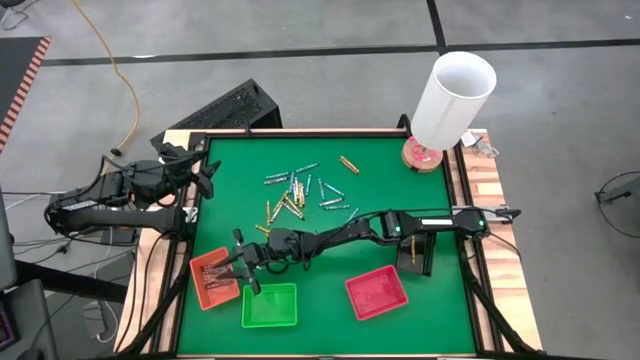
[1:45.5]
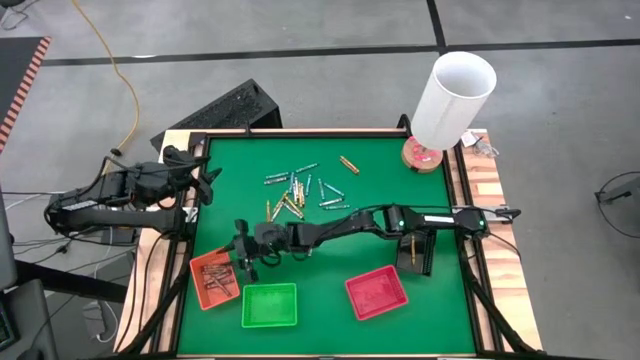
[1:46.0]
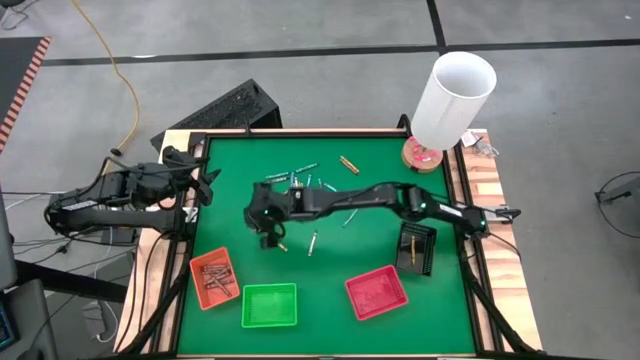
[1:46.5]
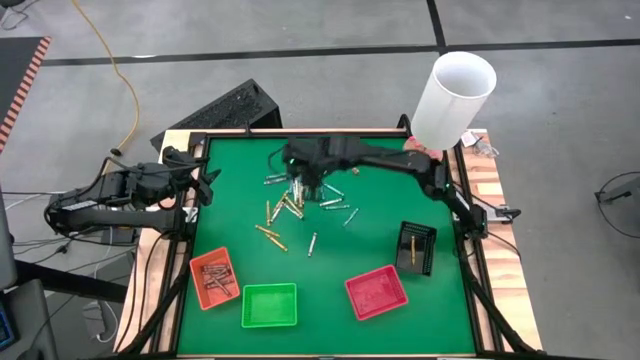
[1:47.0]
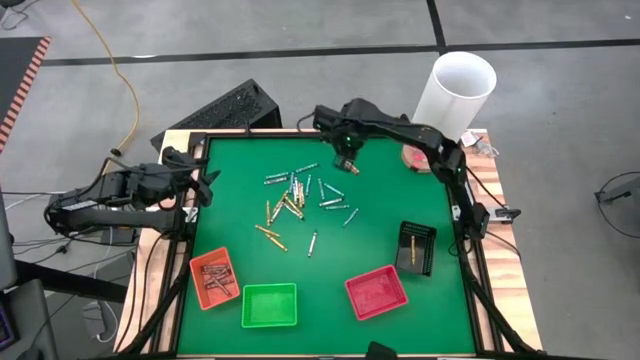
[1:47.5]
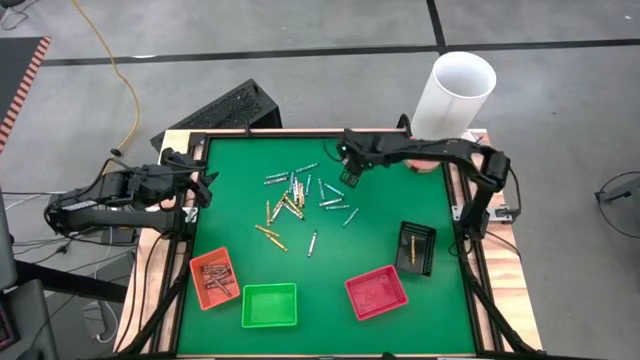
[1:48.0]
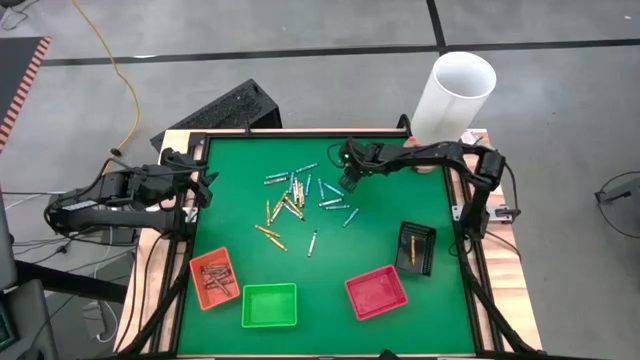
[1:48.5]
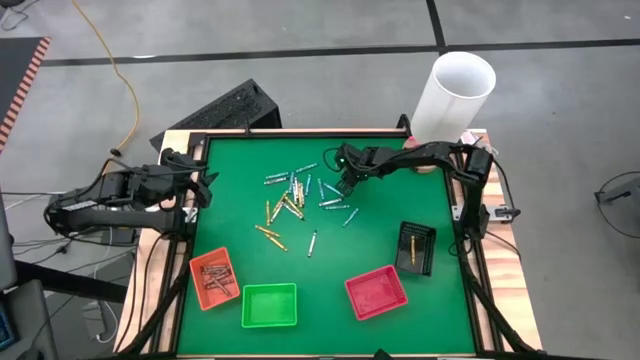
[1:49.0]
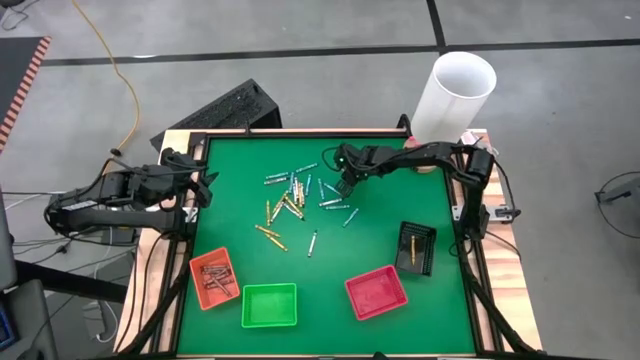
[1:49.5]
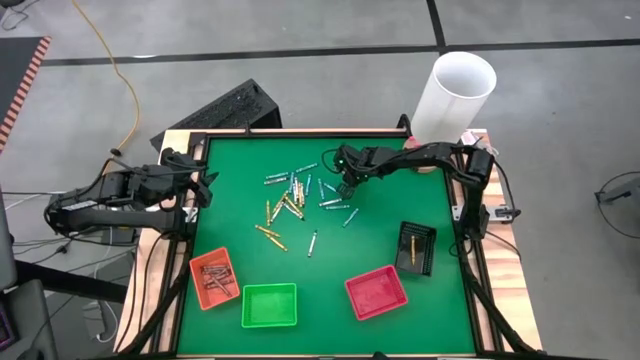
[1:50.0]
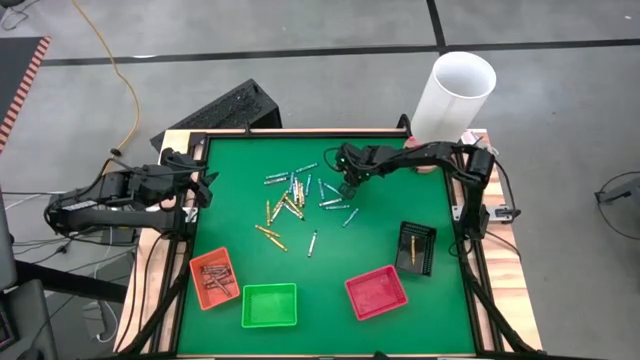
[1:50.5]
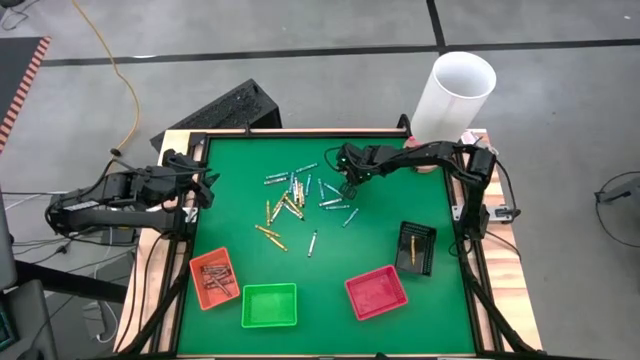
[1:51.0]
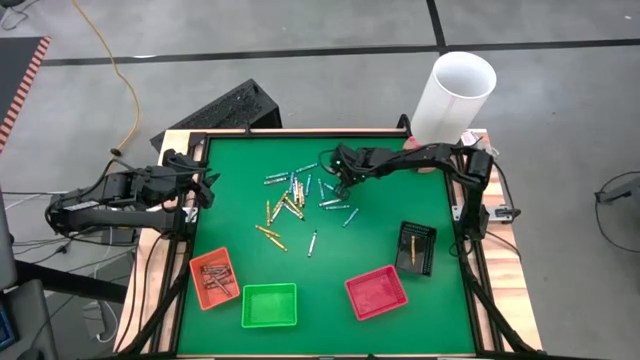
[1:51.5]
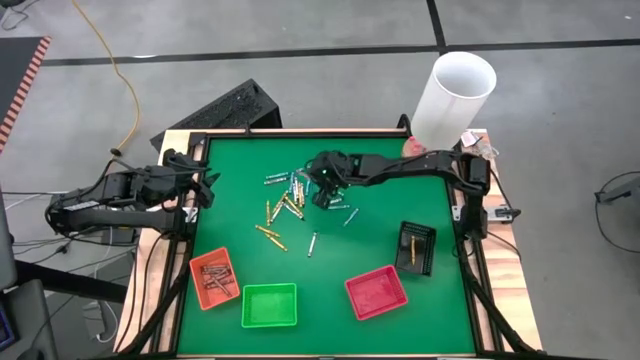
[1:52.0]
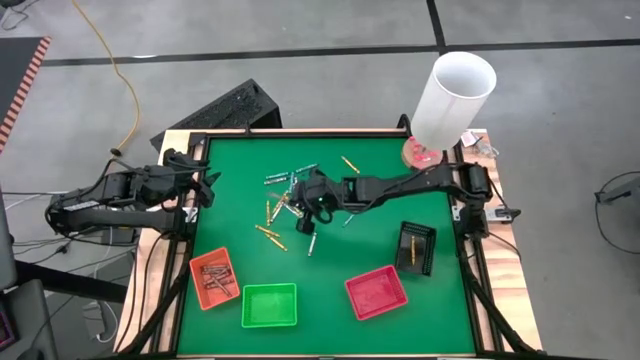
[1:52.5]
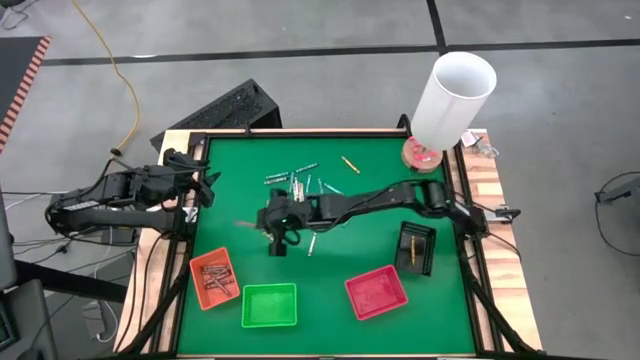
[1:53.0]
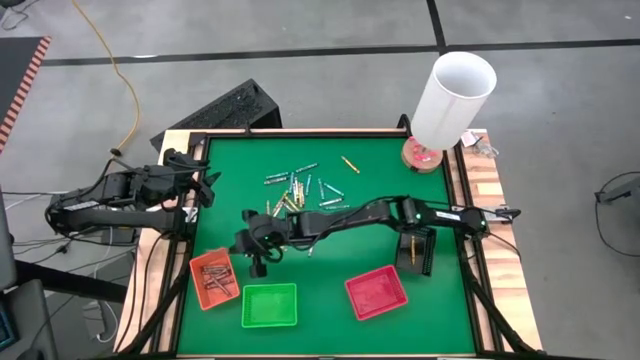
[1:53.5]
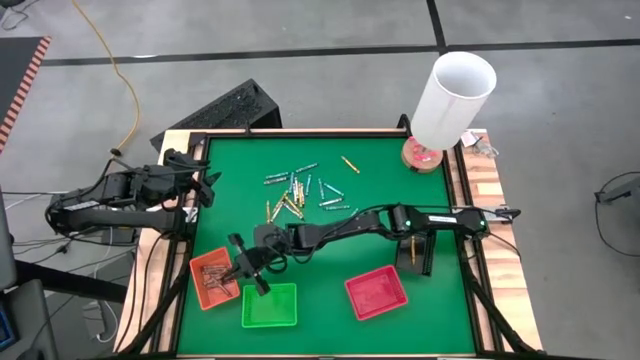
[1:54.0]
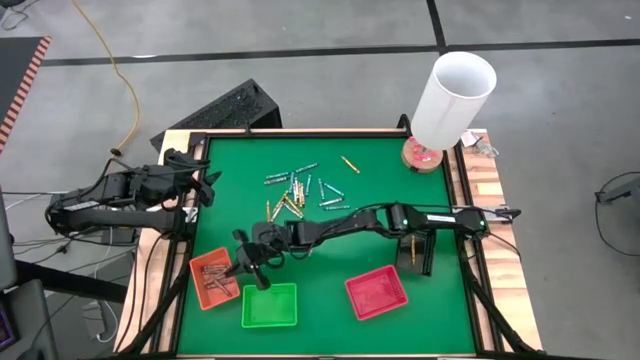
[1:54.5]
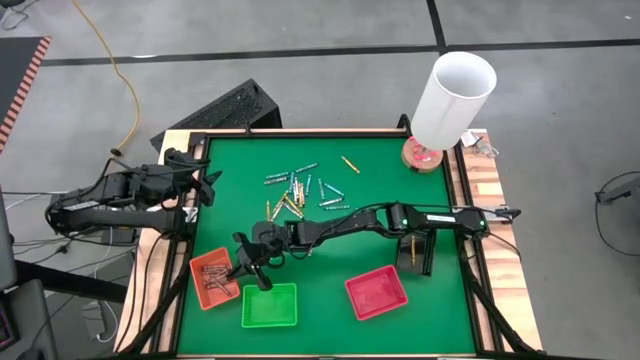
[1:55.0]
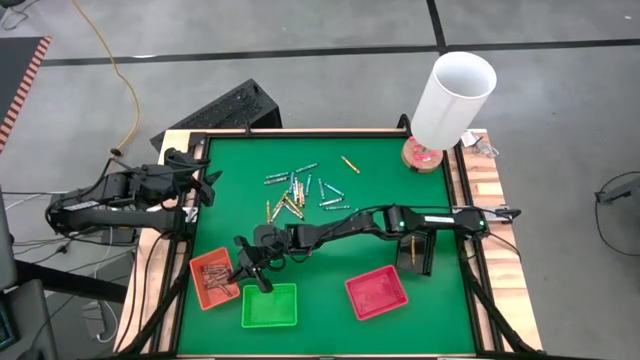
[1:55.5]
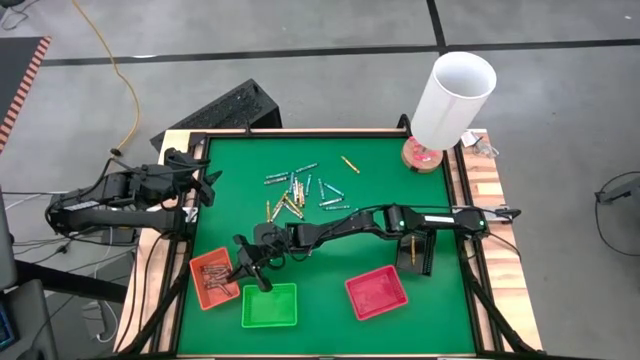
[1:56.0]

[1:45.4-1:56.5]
Task: Sort crayons
Put the brown crayon into the orange bin

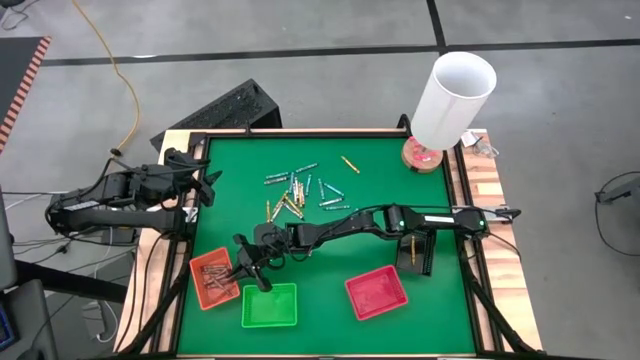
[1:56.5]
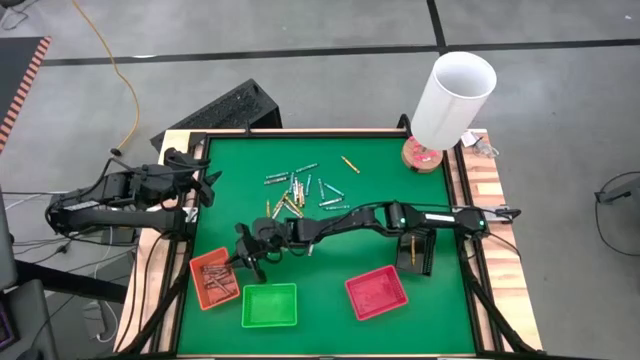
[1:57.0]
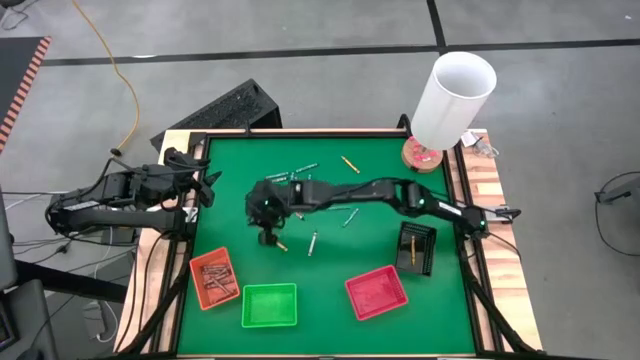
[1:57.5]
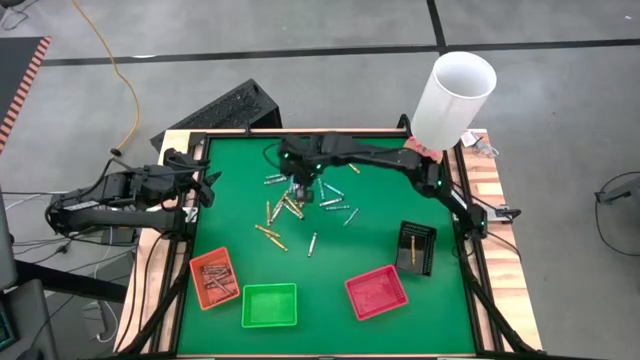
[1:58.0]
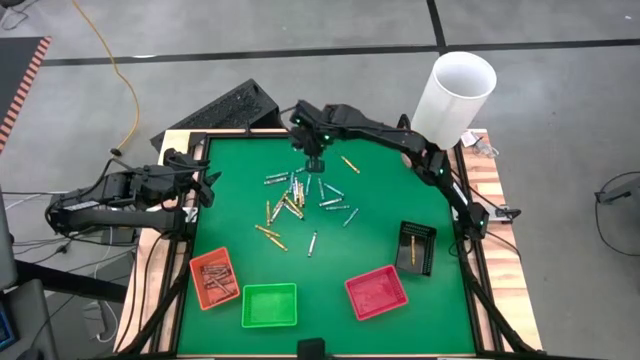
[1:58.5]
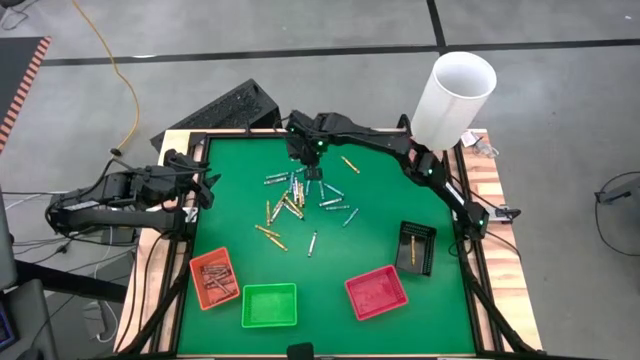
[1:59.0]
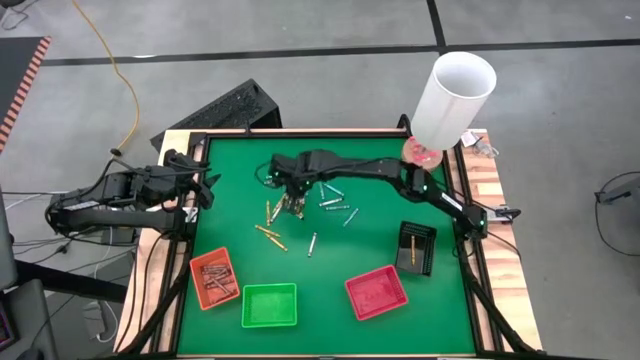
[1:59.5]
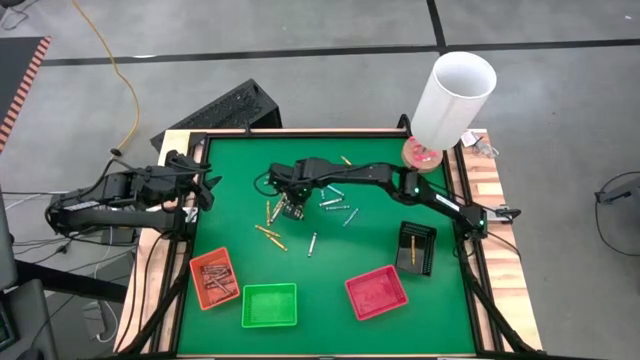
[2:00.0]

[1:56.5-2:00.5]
Put the yellow crayon into the green bin

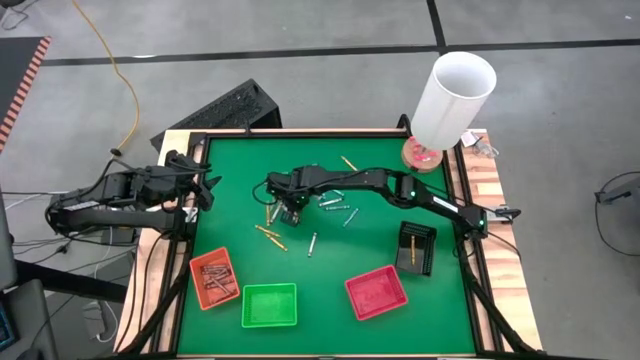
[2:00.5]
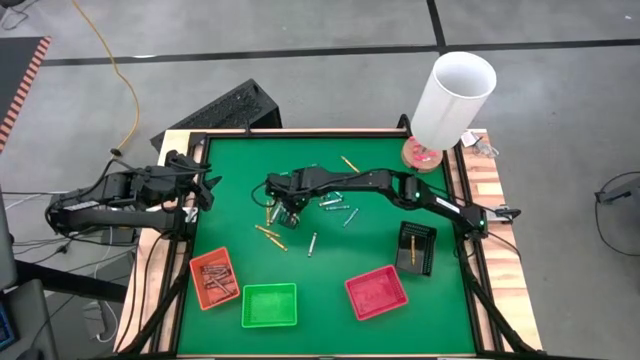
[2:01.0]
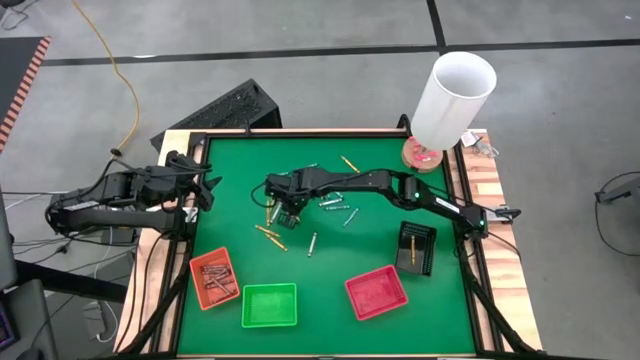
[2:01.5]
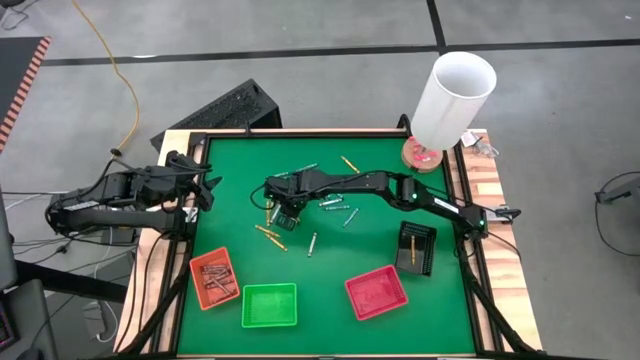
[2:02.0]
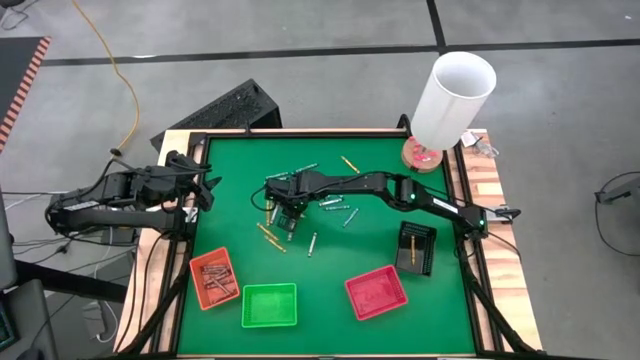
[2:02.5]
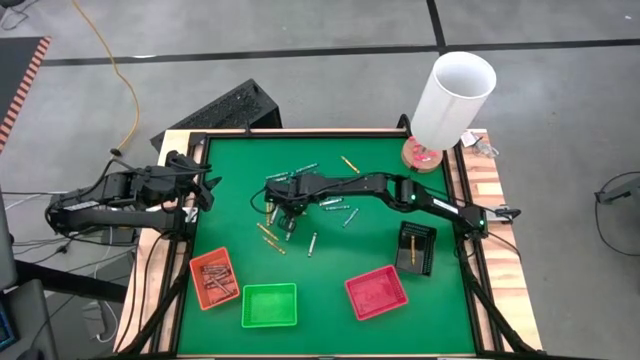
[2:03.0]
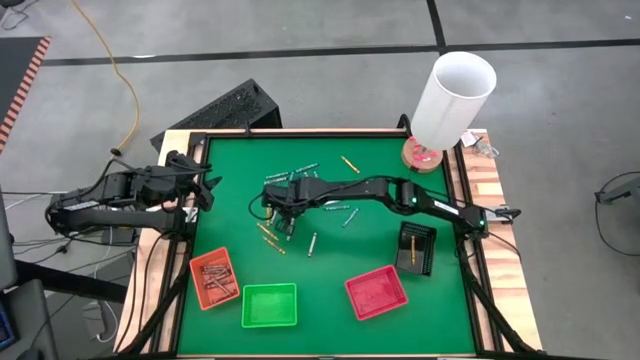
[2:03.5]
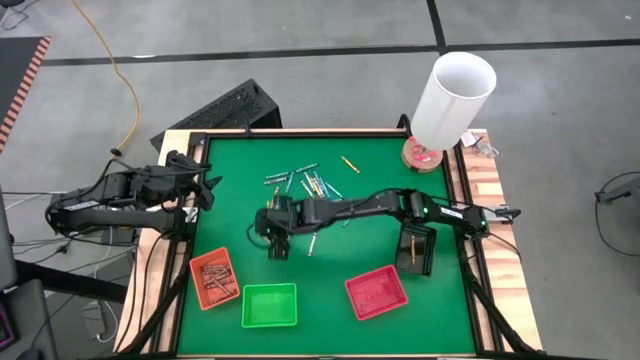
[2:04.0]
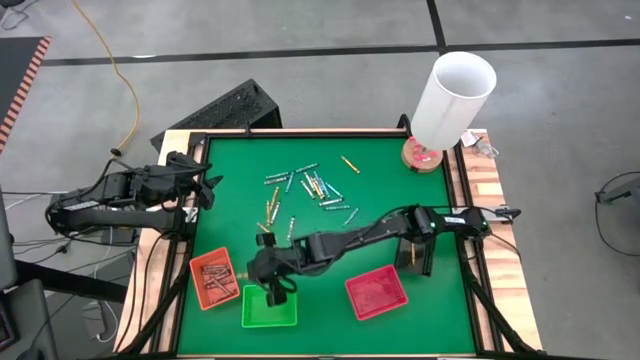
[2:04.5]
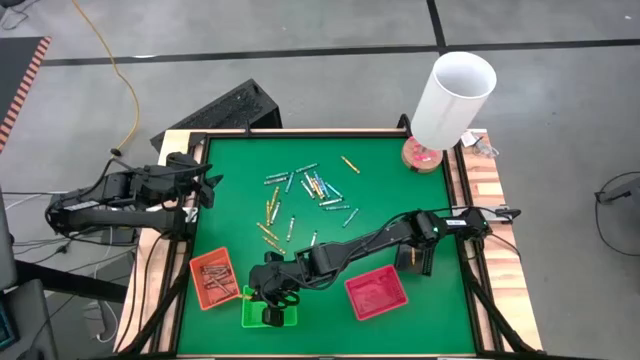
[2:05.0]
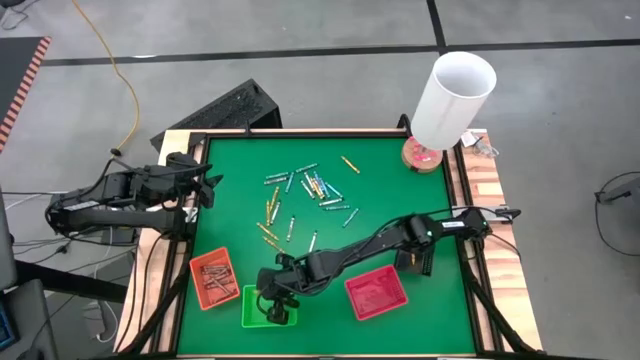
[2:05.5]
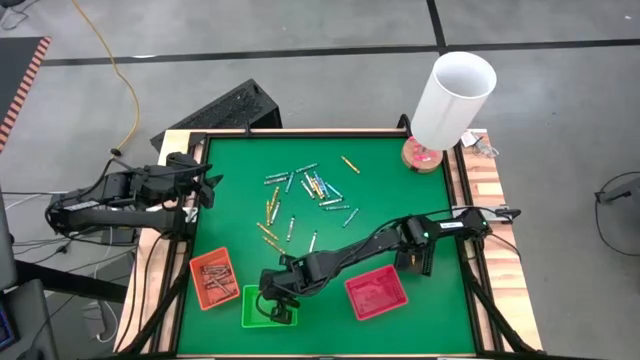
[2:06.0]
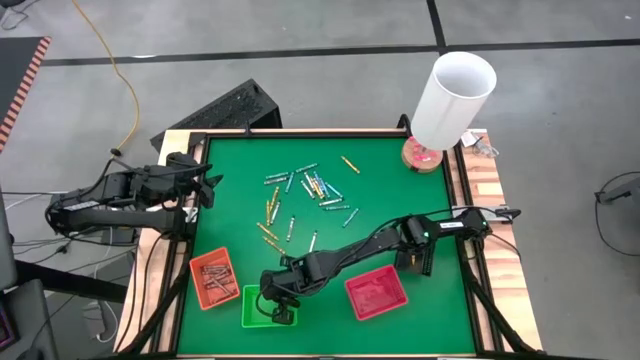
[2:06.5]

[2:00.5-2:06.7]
Put the yellow crayon into the green bin
